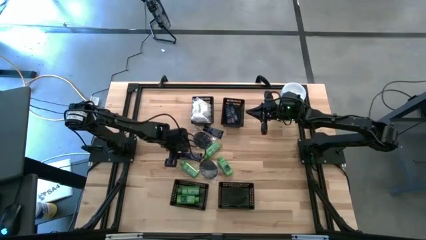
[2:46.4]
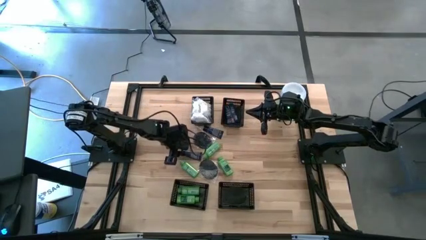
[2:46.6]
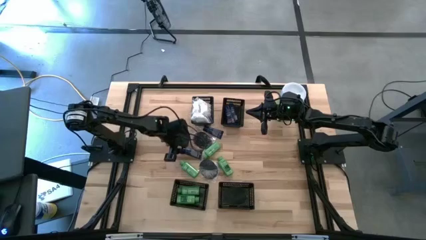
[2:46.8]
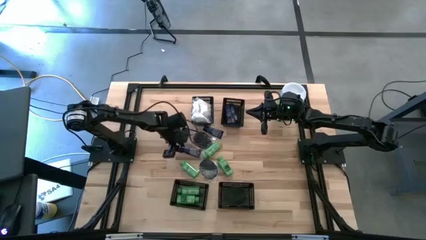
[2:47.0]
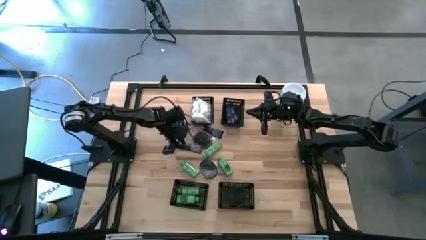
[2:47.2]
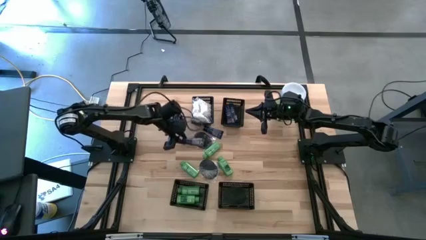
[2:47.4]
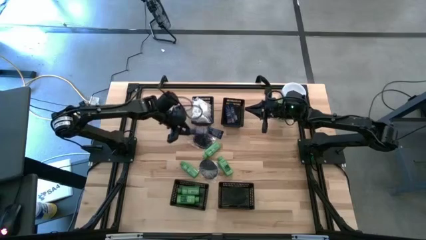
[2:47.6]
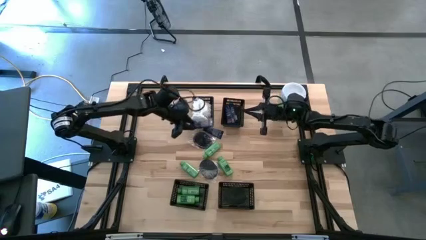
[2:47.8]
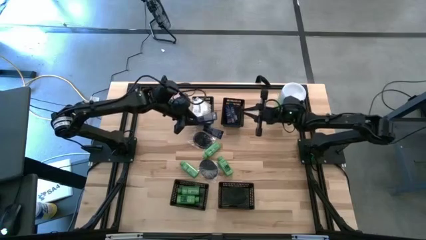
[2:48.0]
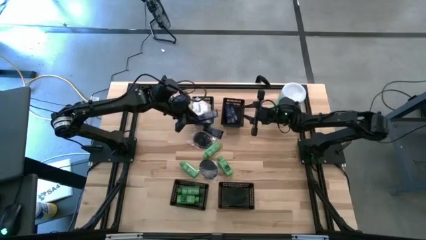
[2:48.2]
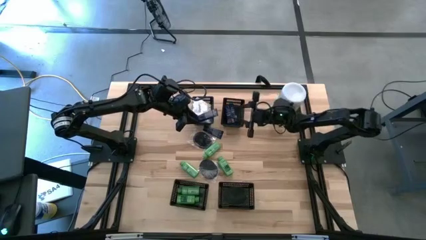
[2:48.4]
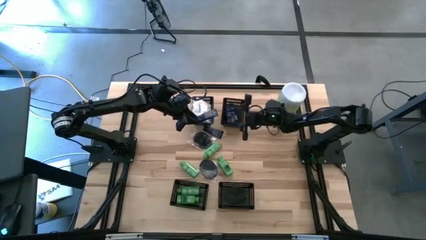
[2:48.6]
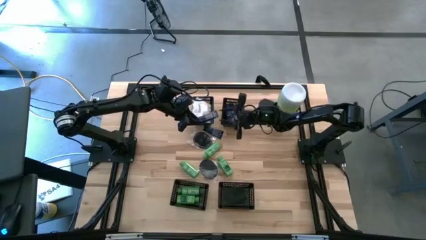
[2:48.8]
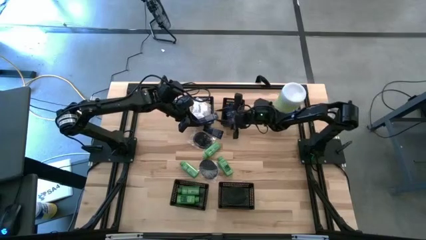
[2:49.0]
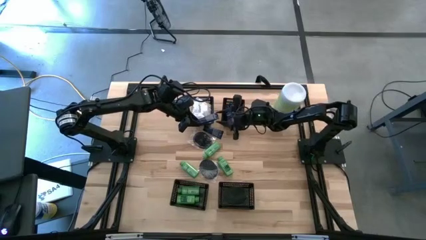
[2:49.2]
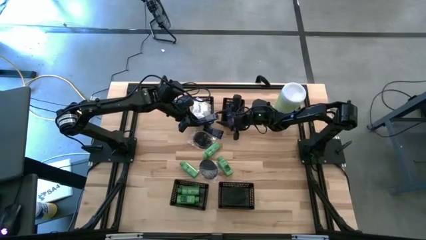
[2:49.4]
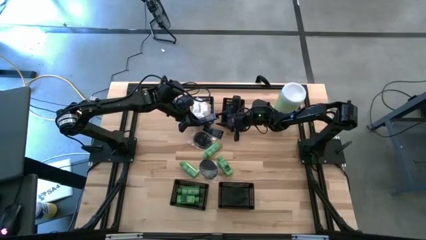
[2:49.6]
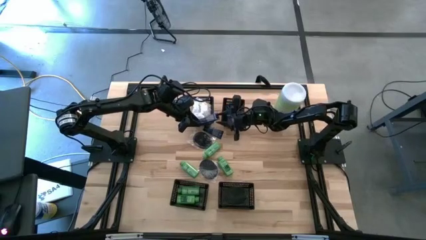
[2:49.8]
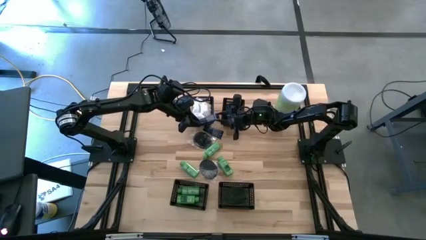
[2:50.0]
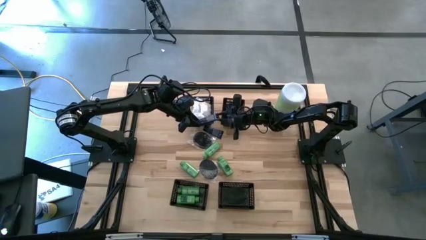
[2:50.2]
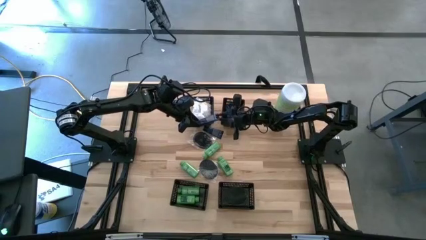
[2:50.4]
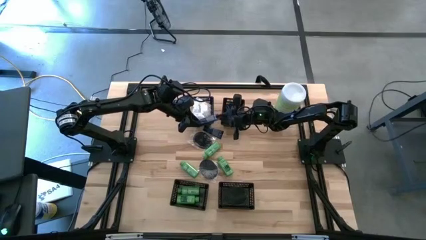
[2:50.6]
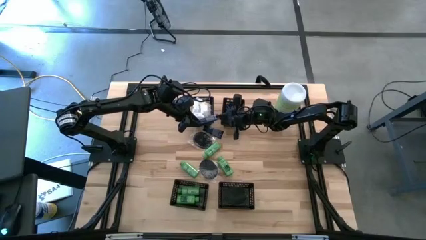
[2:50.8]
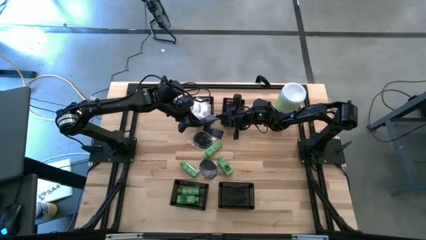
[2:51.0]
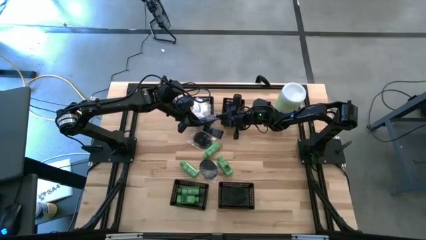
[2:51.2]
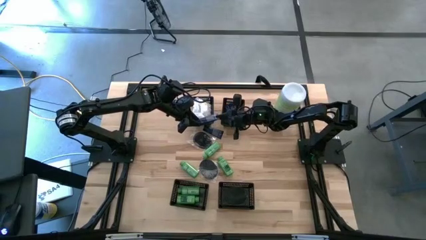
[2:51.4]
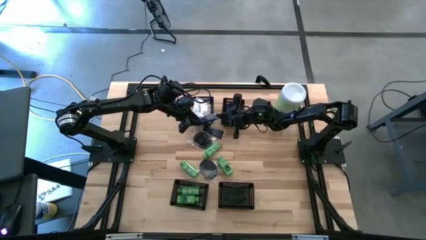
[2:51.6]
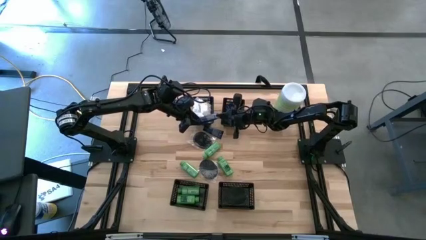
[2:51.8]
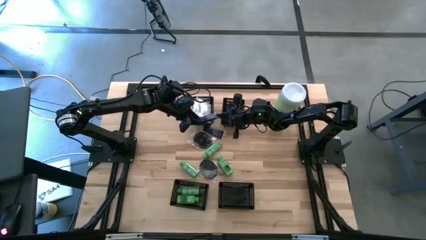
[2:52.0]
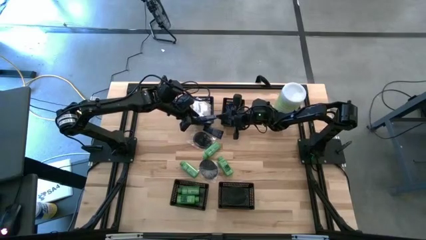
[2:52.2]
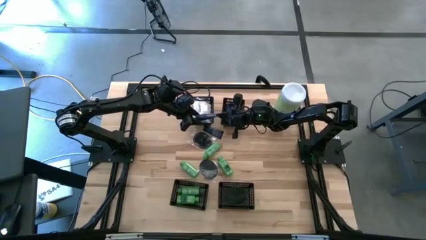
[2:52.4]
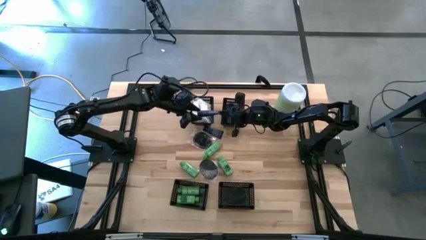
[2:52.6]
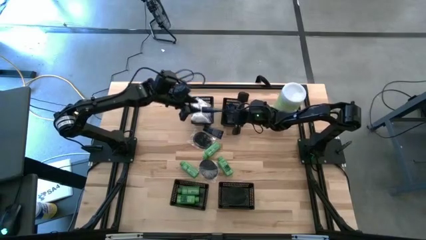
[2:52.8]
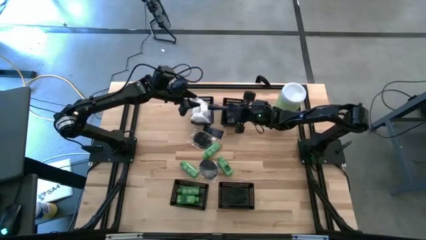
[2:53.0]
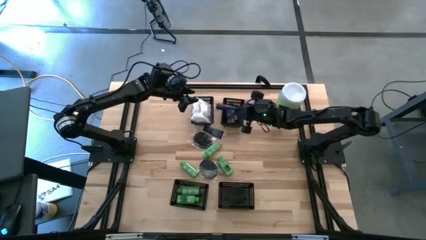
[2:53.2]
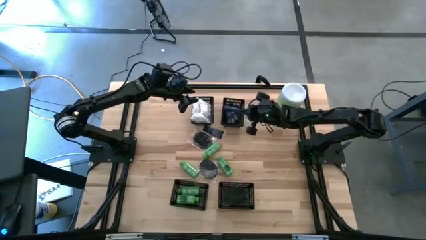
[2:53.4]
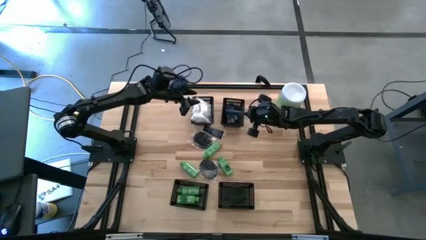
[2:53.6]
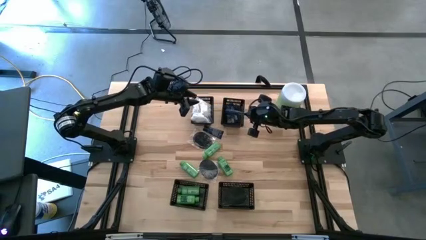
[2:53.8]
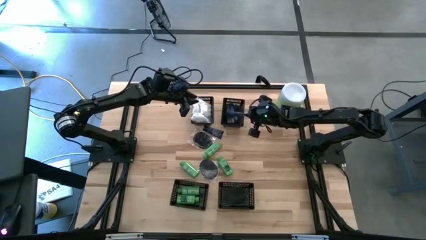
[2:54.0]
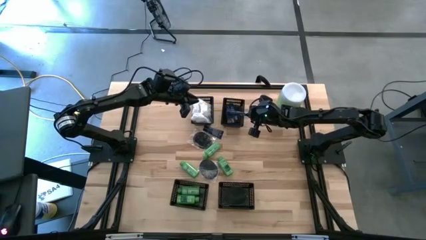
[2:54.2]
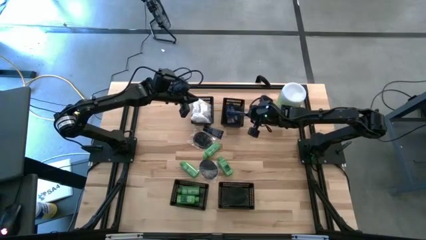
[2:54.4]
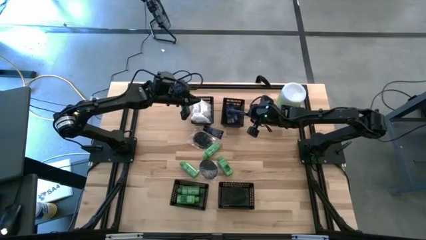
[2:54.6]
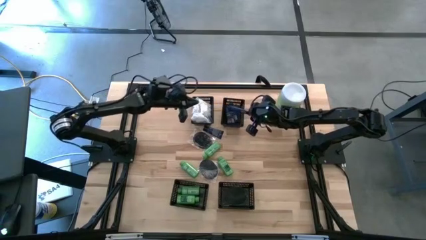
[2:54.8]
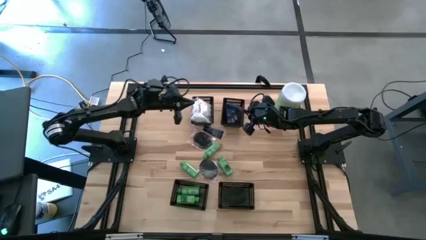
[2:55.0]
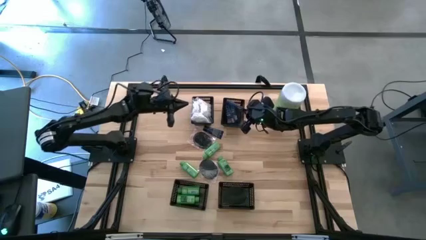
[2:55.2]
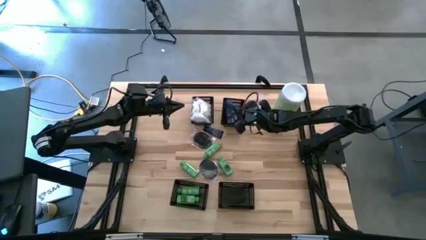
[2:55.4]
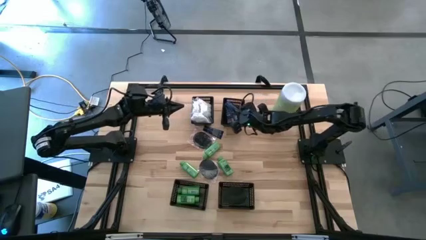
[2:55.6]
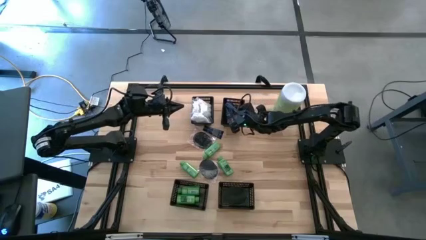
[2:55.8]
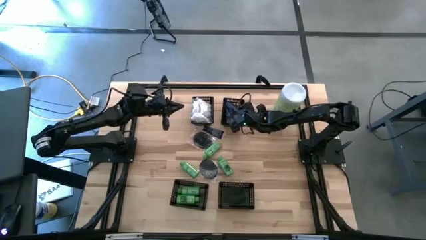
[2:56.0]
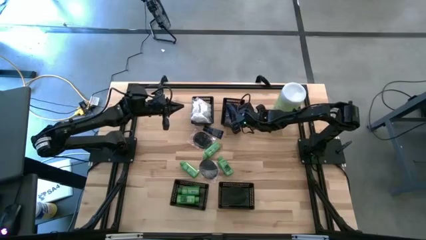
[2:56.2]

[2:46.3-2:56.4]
Task: Pick & Place Travel size toiletries
Put the blue shave cream into the top right black bin

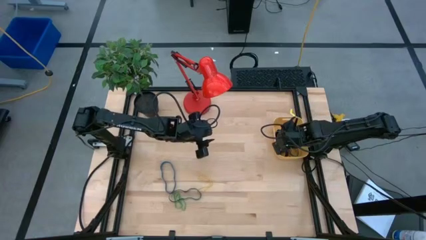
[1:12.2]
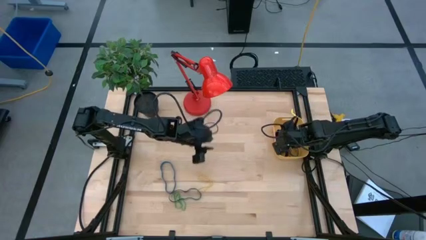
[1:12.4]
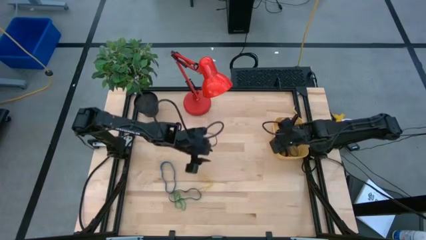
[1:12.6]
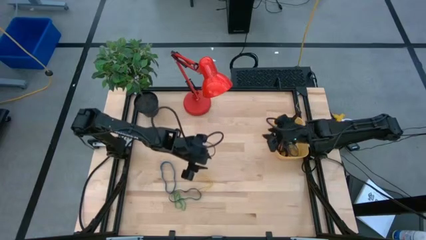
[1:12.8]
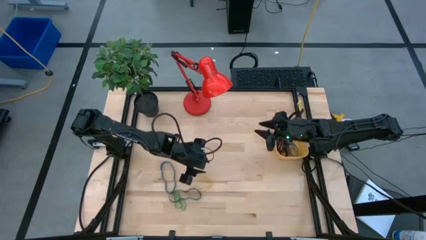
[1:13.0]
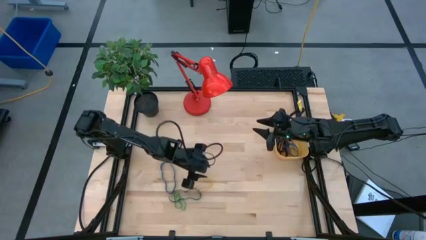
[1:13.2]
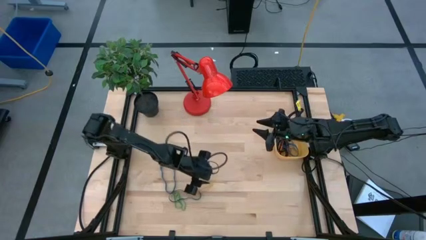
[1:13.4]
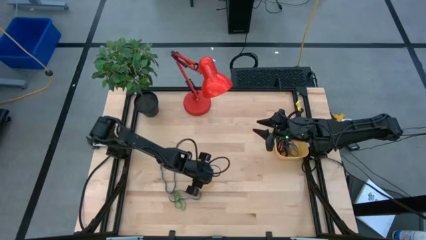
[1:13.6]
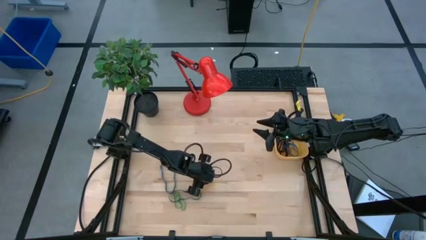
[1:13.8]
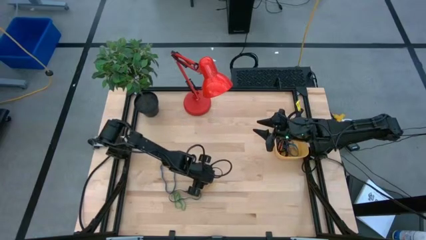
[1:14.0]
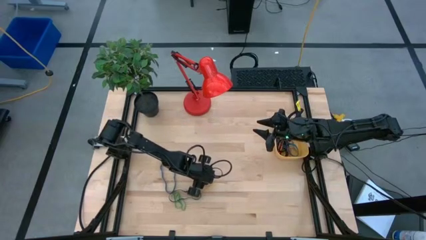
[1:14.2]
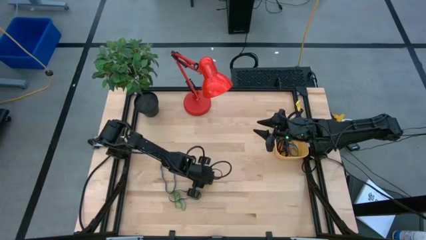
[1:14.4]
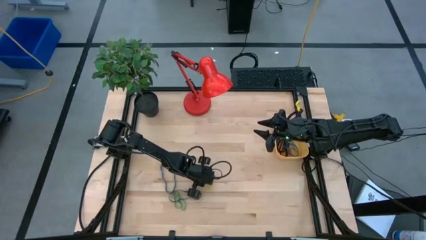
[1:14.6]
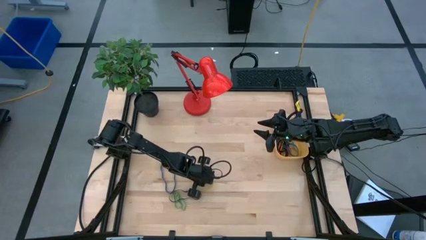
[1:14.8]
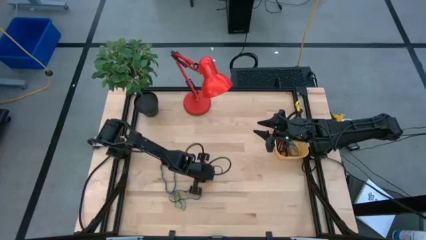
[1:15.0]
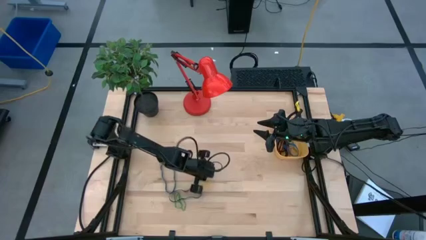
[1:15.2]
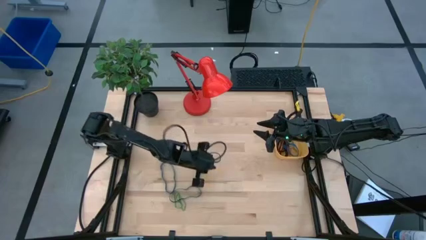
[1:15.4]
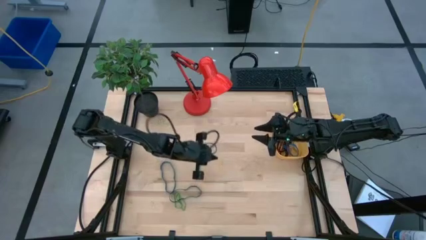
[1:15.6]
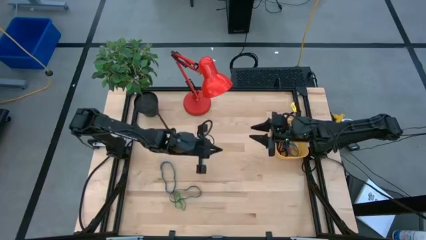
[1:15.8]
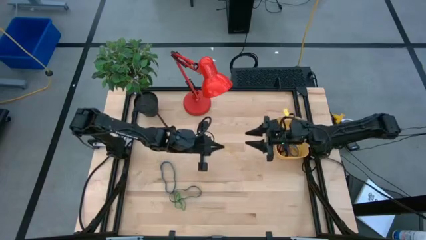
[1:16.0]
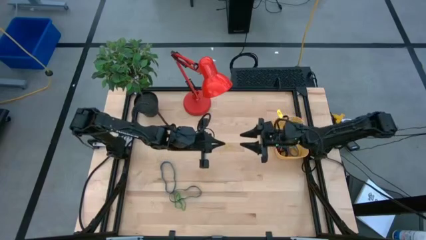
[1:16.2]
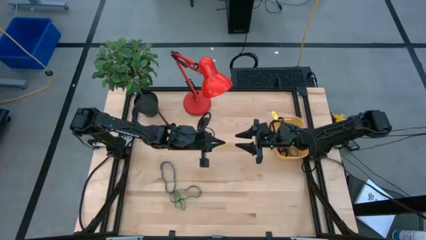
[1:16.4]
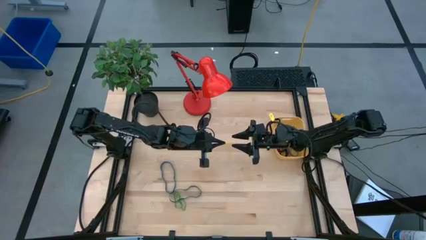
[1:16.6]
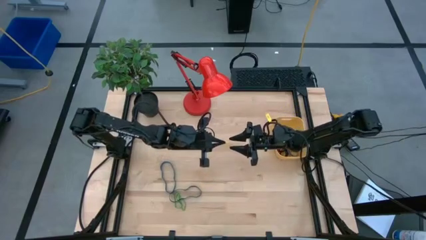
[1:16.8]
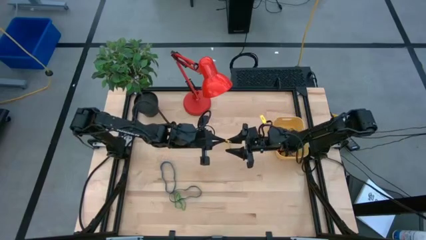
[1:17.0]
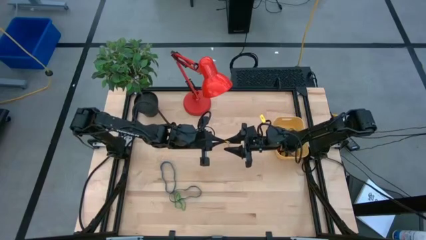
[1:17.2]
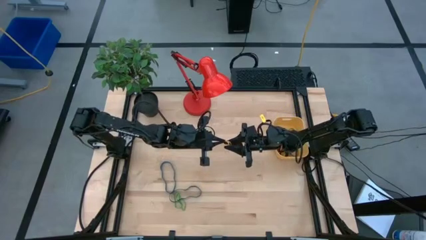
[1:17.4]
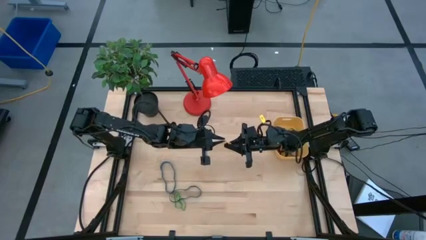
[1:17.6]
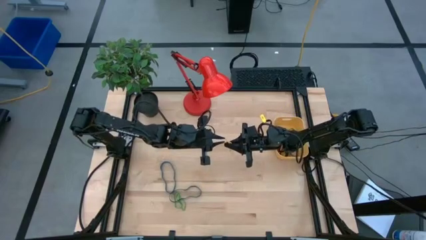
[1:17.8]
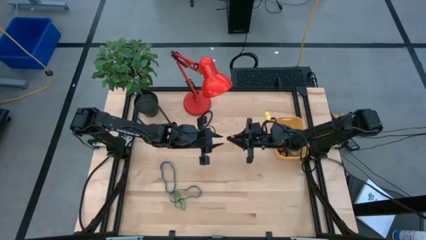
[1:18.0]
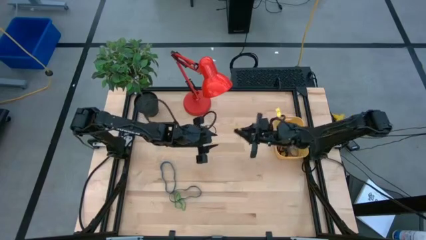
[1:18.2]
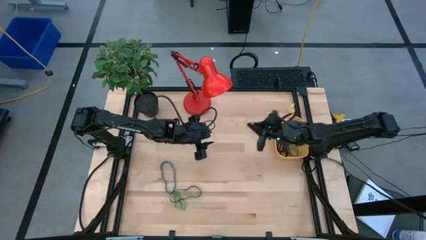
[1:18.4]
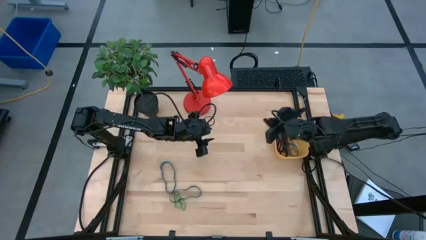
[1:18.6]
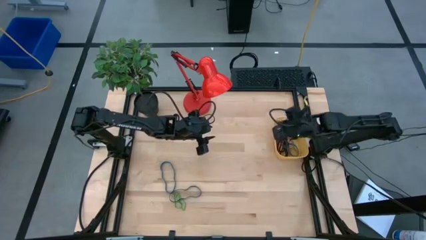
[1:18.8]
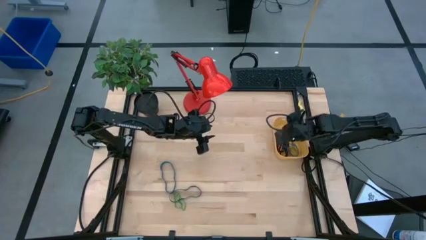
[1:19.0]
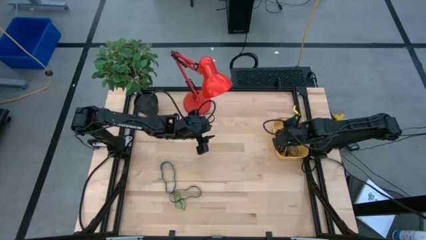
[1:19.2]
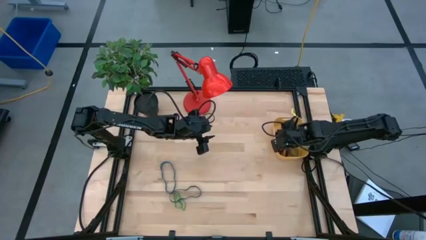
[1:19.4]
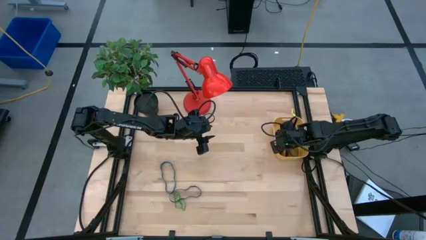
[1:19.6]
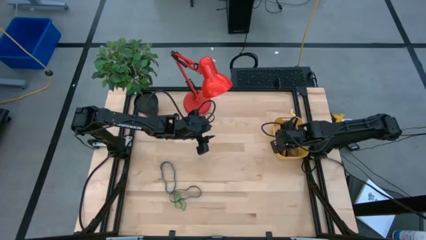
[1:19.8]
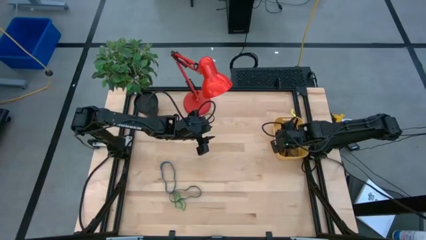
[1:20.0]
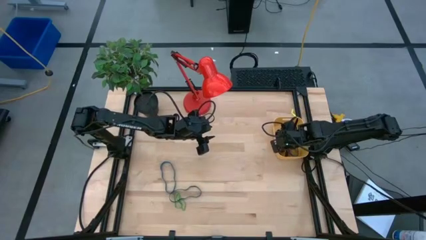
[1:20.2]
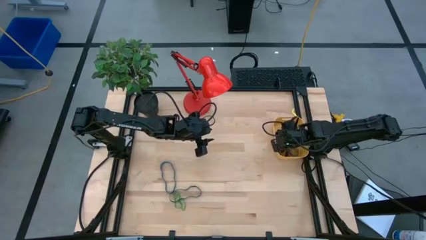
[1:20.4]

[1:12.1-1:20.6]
Task: Pick and place rubber bands into bin
Put the yellow rubber band into the yellow bin
